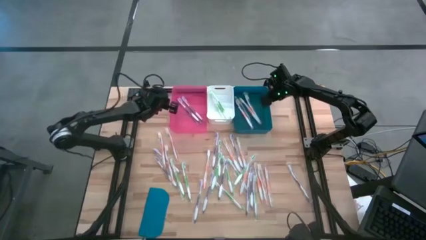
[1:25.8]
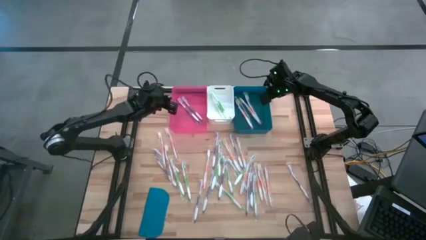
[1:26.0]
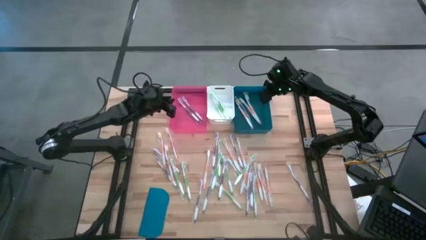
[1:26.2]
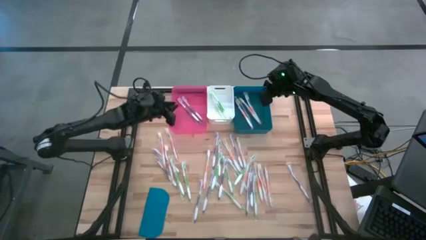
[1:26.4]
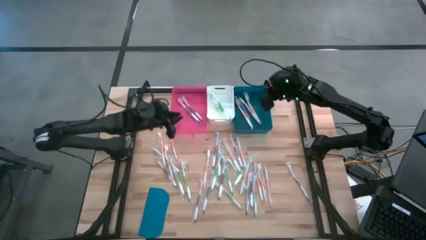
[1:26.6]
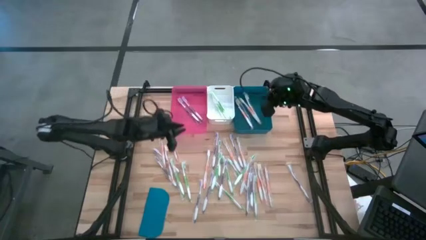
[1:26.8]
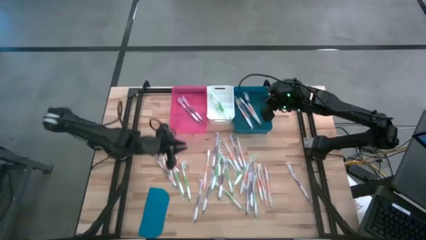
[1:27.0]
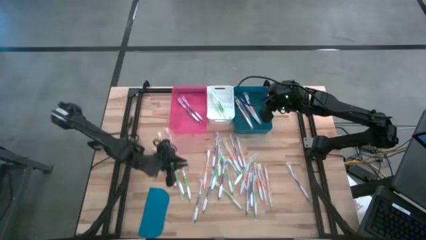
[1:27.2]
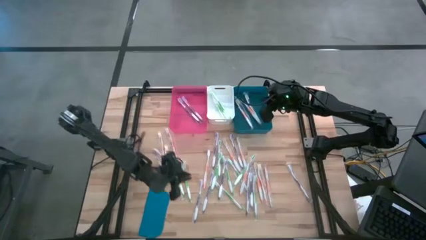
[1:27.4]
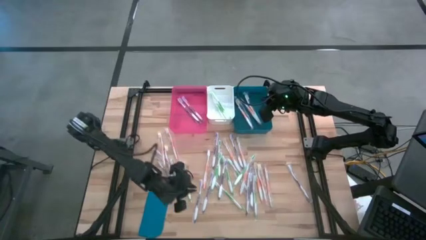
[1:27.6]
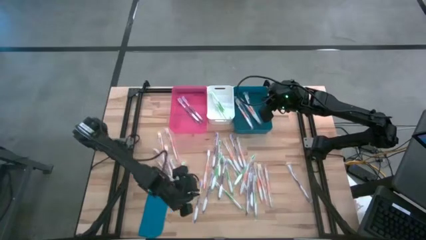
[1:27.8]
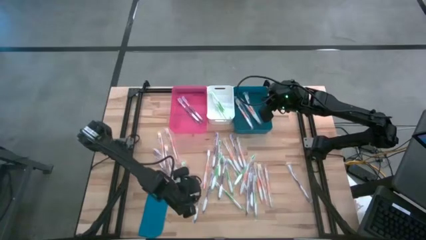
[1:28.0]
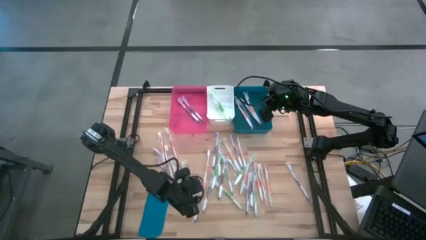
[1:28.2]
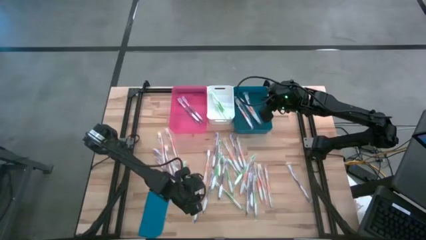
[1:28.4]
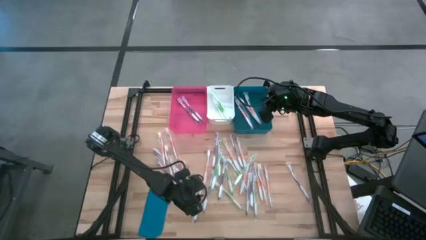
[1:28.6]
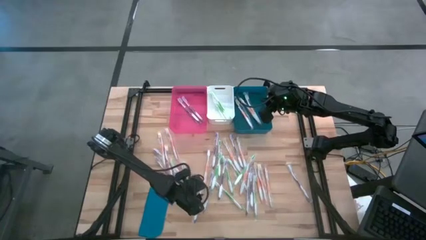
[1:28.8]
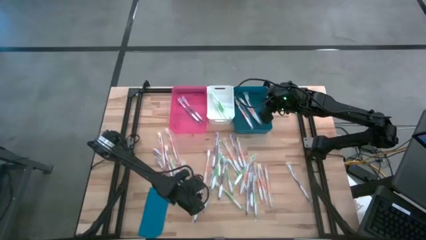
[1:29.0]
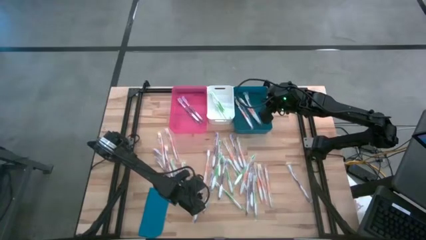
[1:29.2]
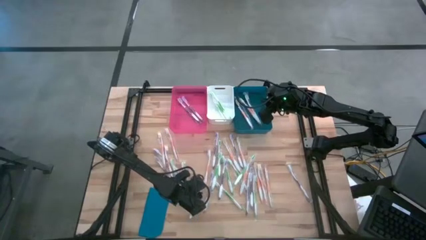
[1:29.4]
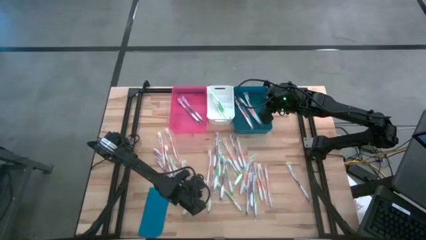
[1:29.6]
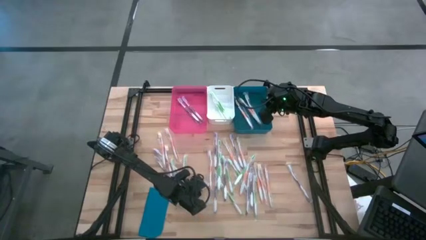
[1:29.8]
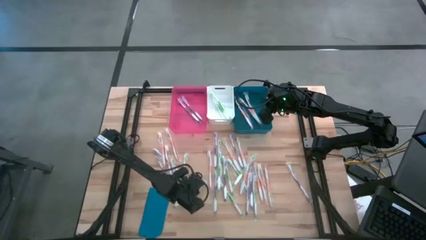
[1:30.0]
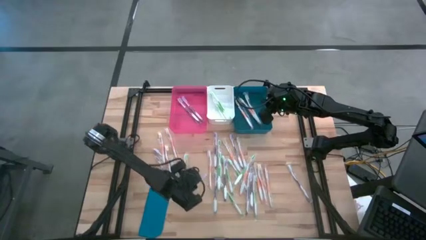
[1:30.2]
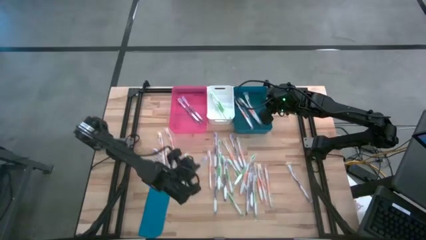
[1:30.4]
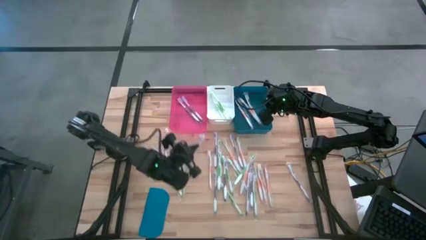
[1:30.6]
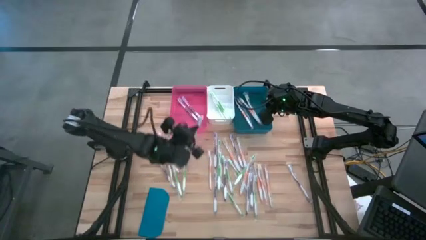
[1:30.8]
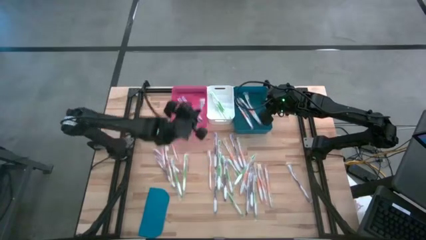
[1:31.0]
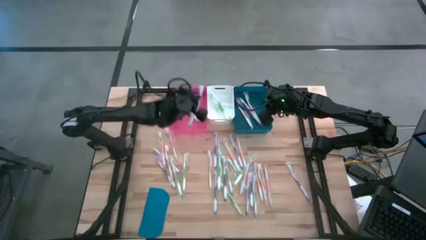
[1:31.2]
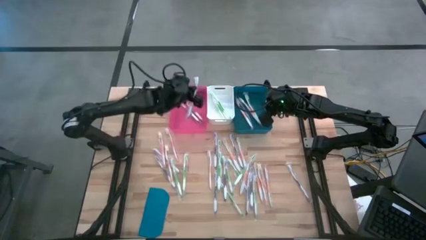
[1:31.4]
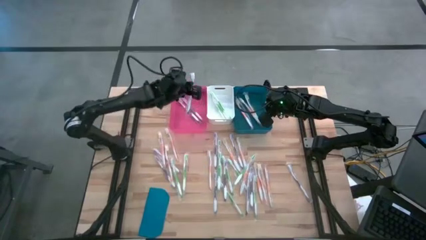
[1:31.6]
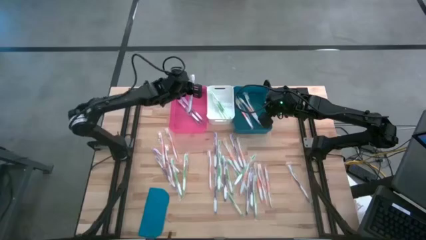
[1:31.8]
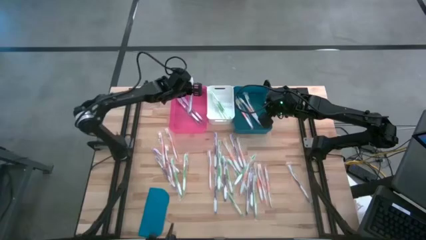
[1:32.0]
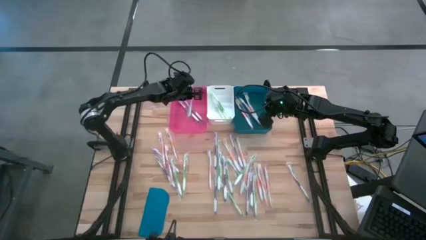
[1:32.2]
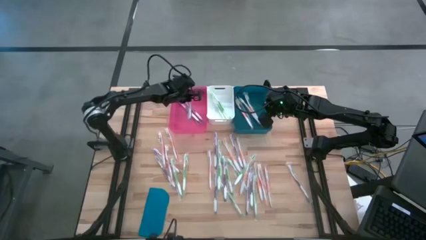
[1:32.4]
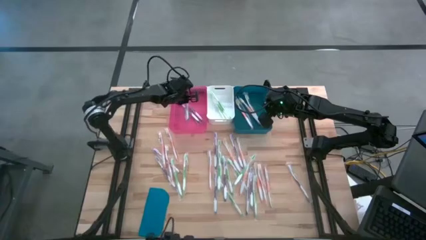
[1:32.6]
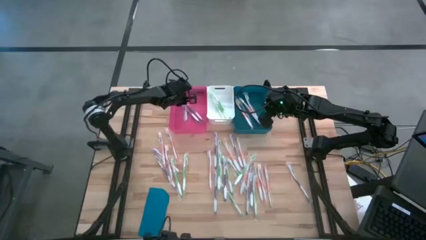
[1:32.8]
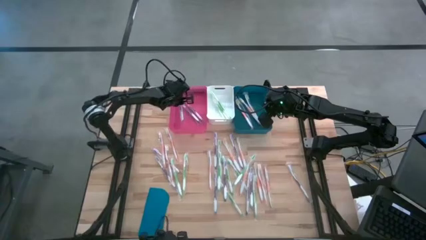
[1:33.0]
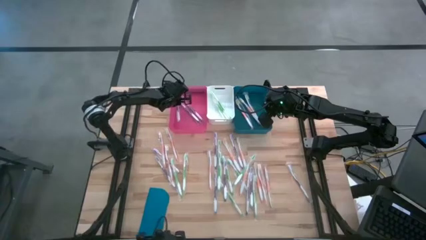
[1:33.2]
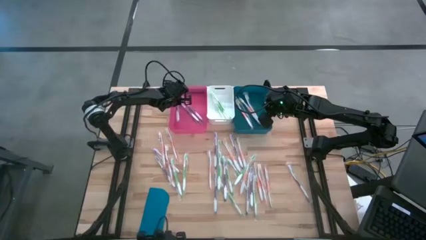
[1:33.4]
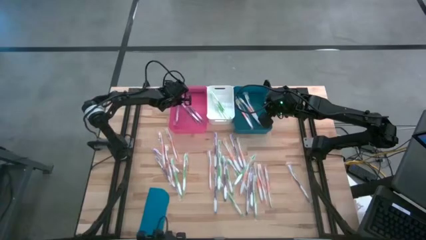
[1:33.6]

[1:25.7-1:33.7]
Task: Pick & Place Toothbrushes
Put the violet toothbrush into the pink bin

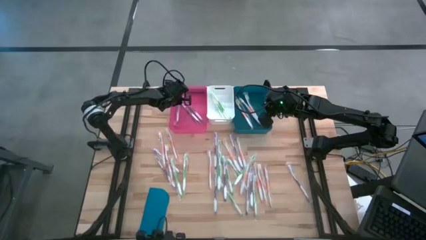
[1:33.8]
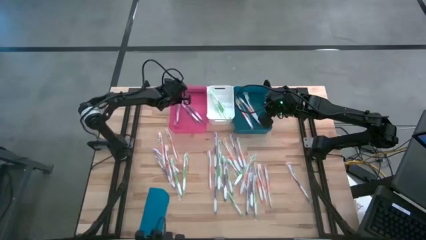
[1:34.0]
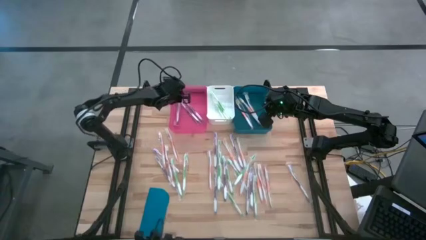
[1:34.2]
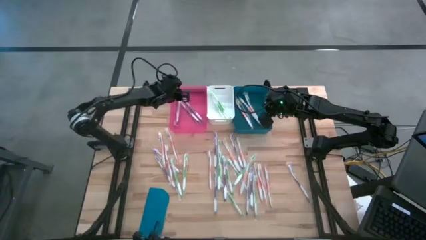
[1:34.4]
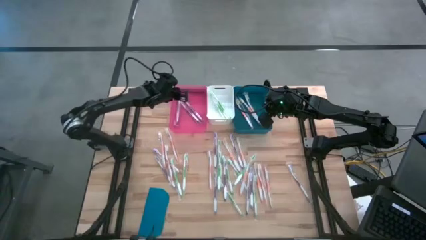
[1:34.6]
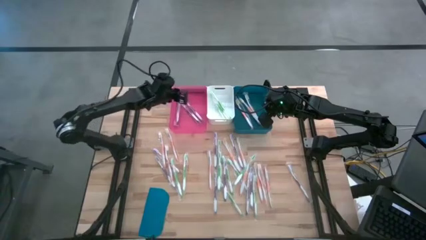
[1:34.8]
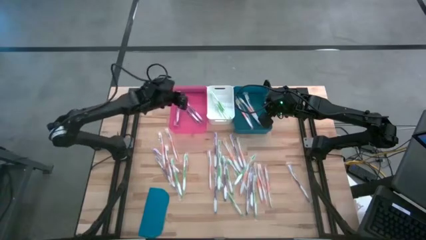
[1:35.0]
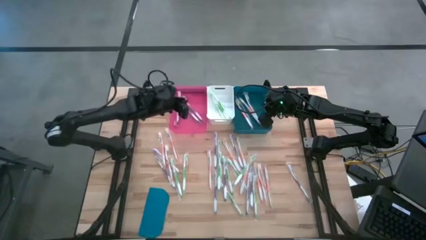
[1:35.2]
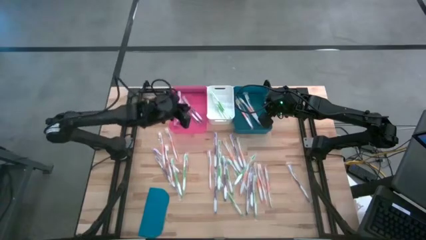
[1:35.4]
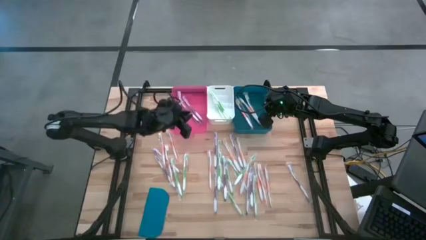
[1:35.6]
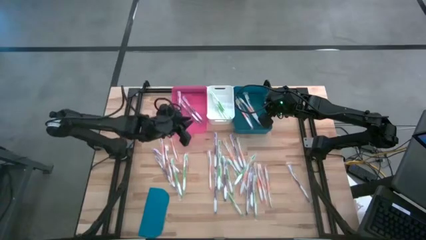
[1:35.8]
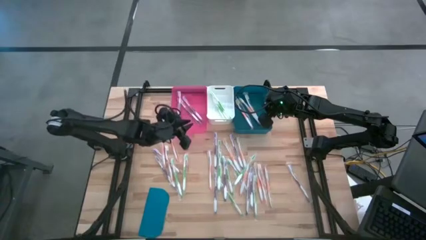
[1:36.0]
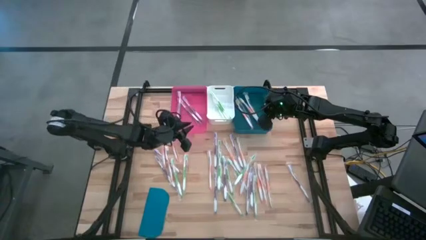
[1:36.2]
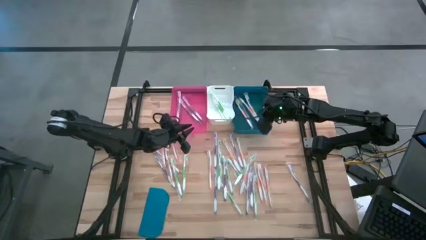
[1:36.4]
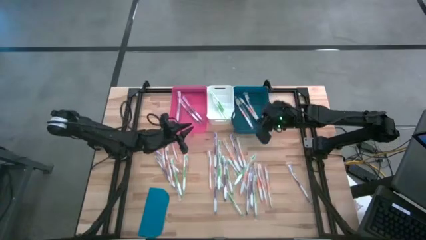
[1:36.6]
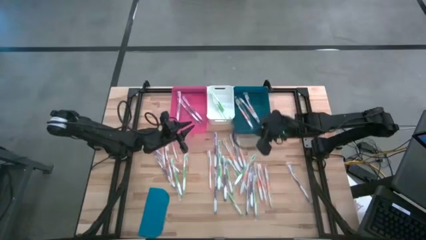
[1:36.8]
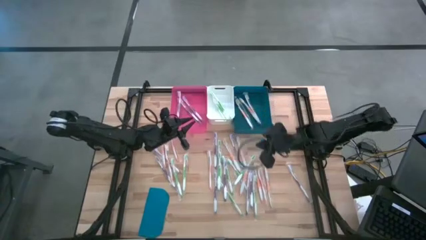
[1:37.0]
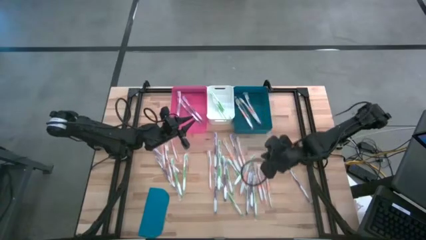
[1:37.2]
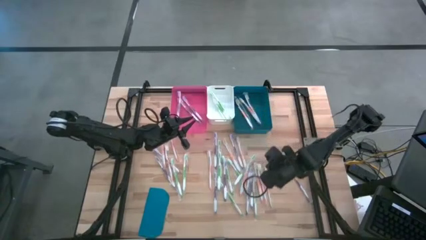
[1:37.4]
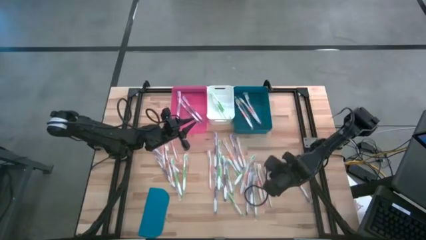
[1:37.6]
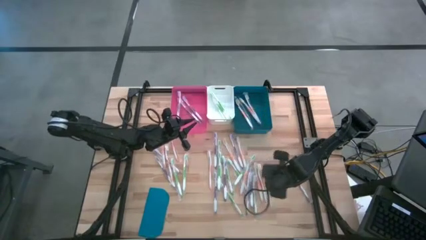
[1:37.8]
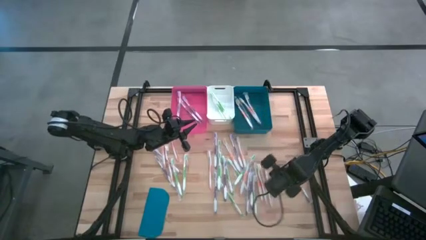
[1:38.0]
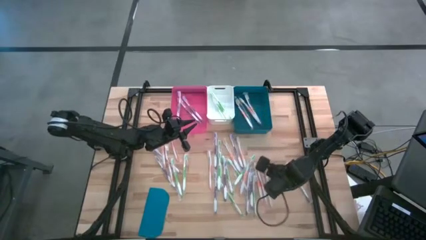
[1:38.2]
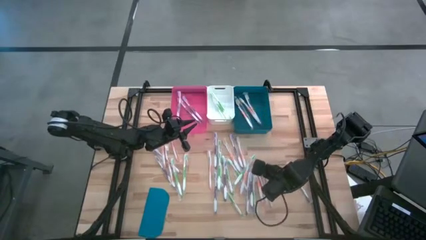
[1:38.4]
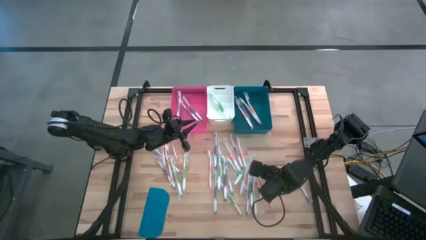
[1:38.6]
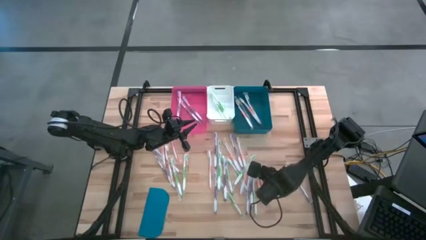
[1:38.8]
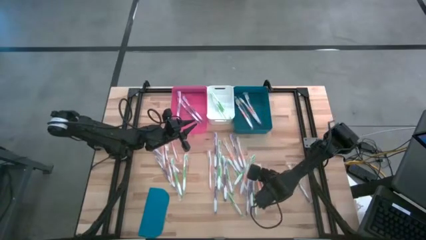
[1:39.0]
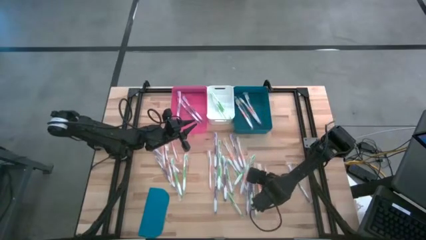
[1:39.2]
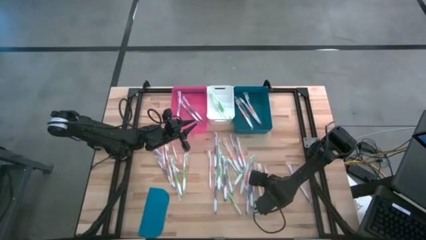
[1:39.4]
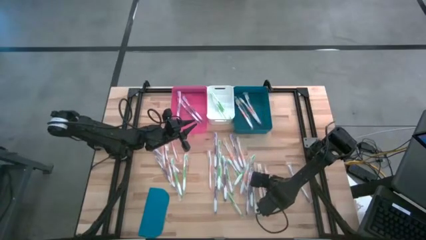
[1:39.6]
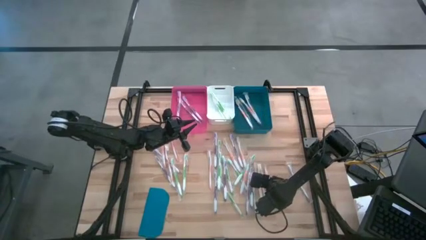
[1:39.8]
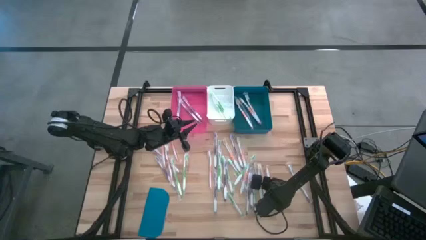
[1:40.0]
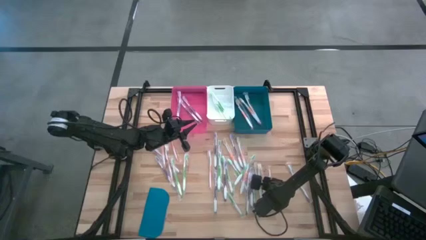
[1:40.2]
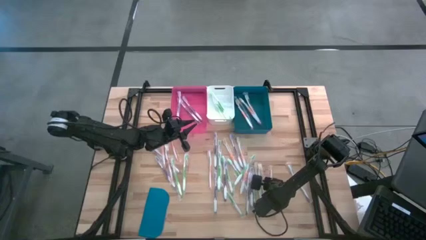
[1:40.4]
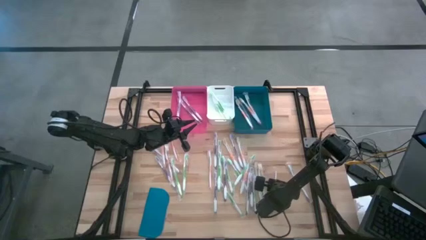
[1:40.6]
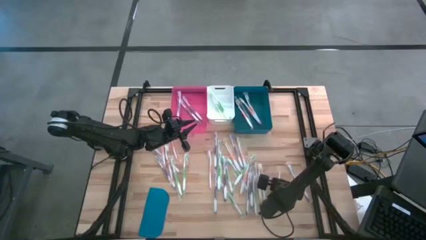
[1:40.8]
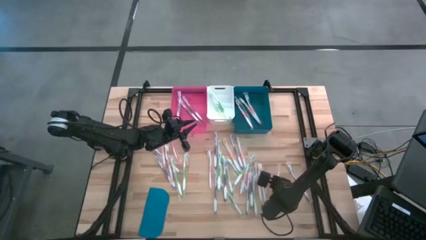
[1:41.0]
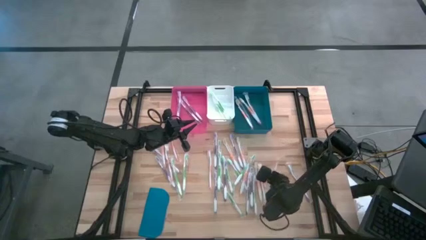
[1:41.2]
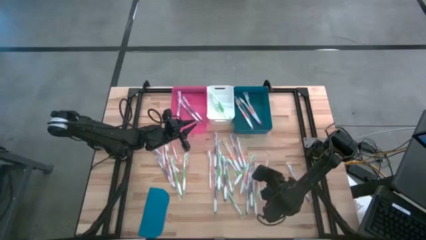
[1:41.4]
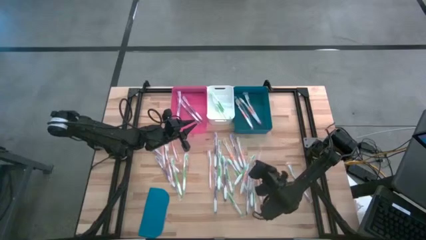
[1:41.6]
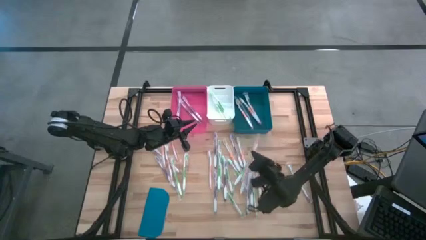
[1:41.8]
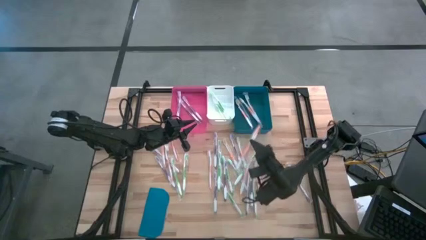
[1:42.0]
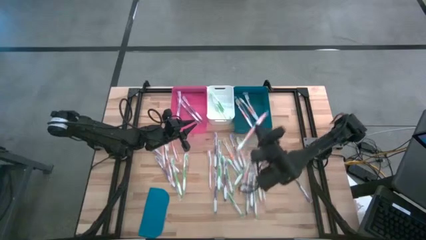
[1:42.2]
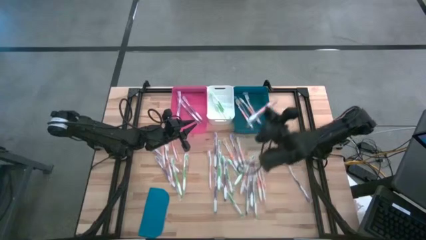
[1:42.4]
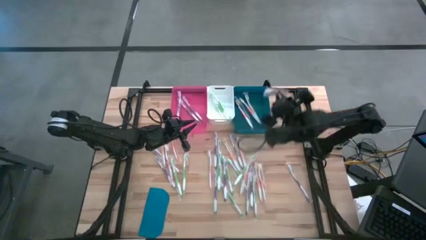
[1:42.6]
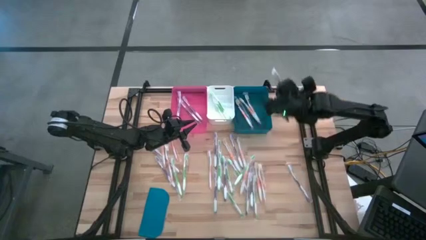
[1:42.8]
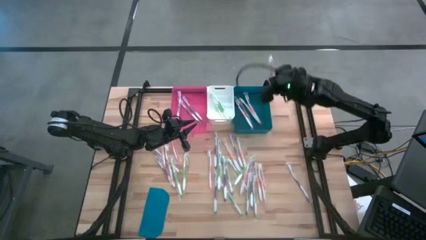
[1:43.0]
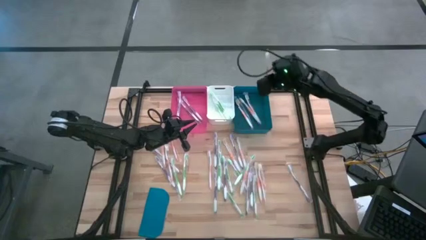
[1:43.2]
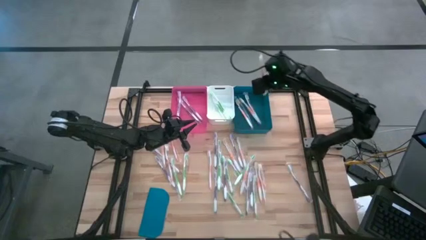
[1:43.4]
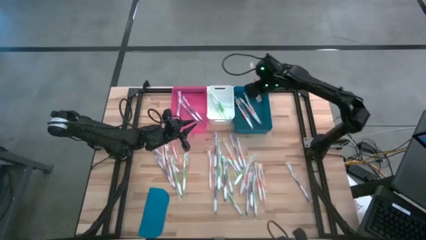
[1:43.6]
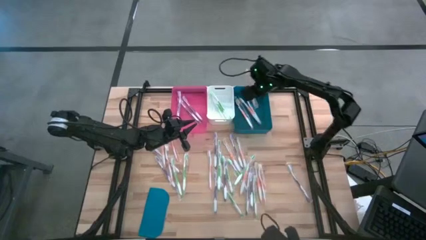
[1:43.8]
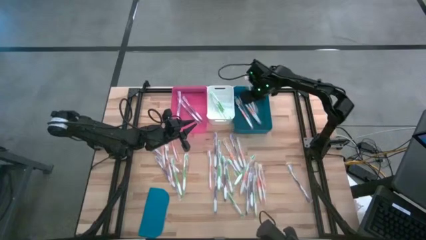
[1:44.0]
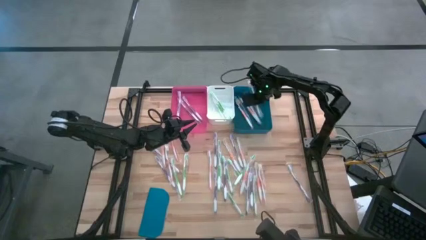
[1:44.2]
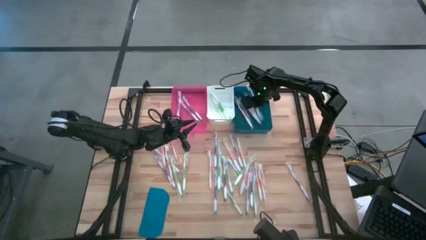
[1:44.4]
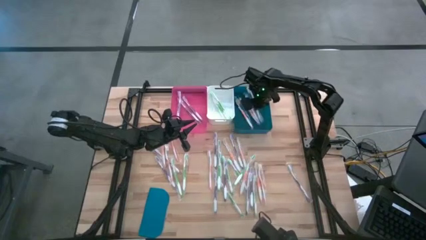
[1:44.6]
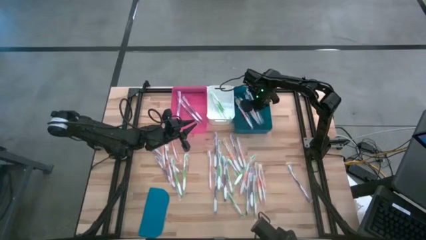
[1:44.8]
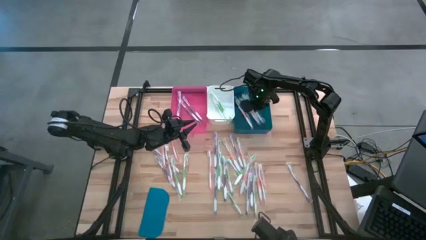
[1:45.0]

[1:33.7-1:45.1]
Put the orange toothbrush into the blue bin
